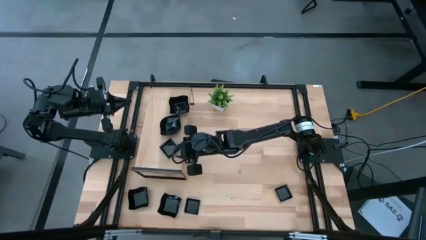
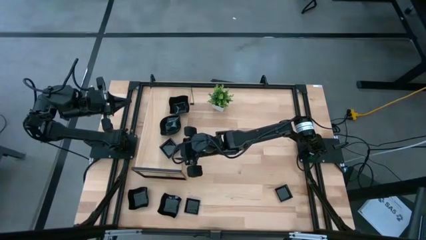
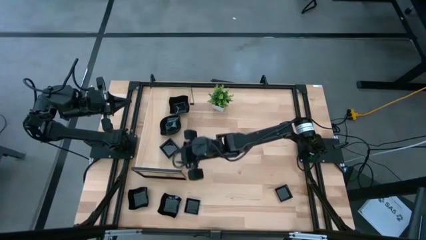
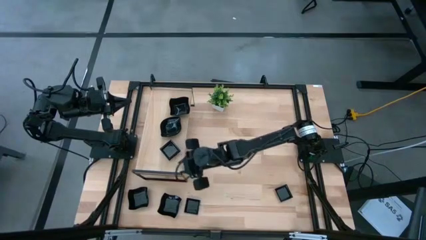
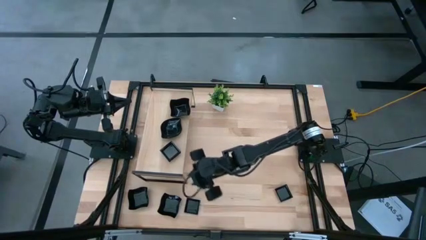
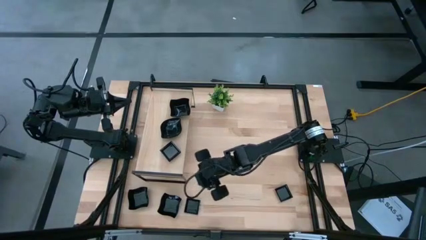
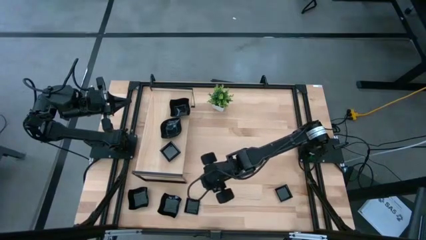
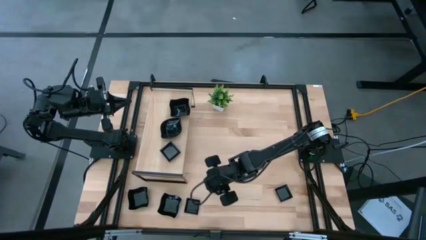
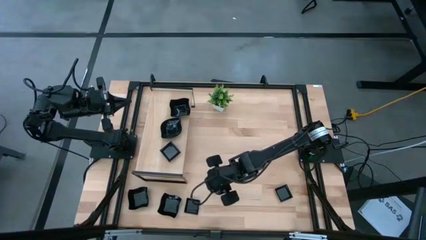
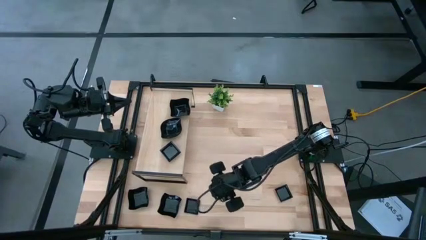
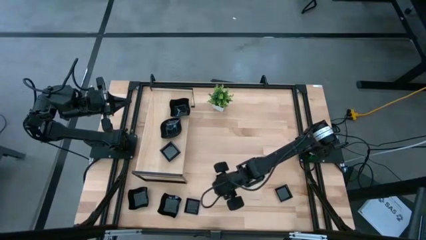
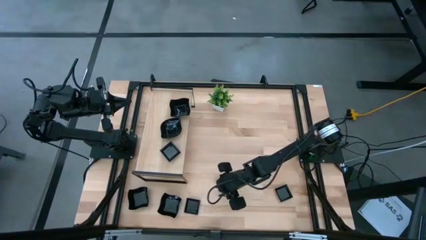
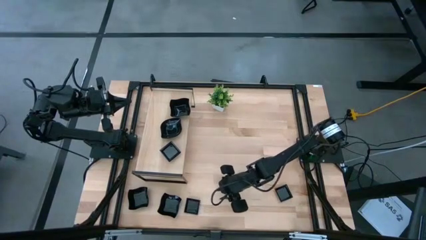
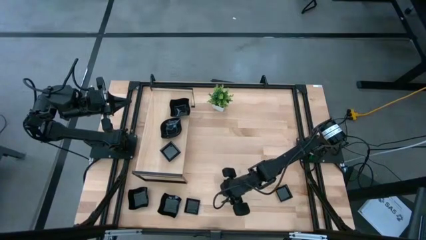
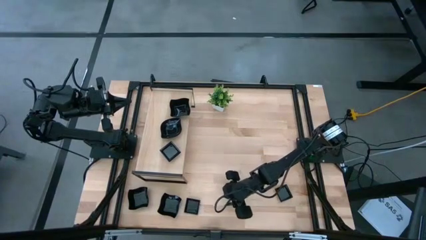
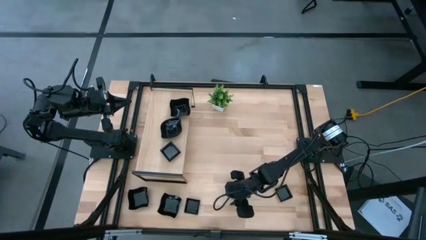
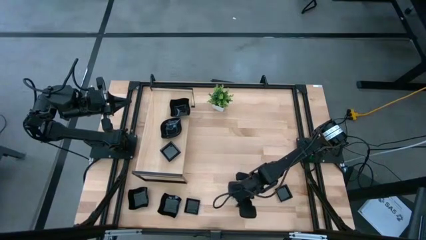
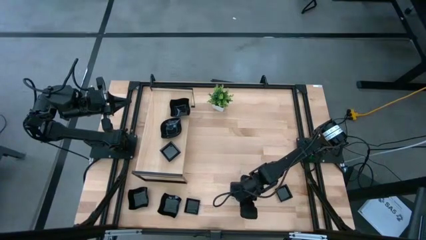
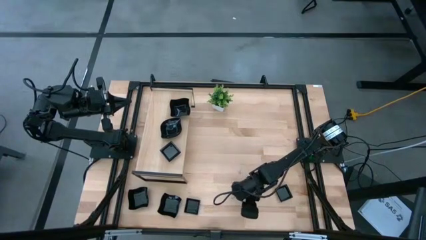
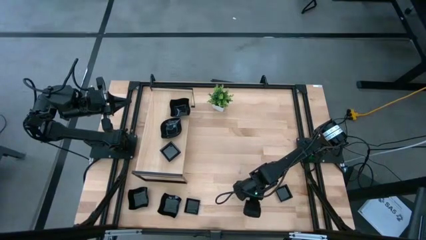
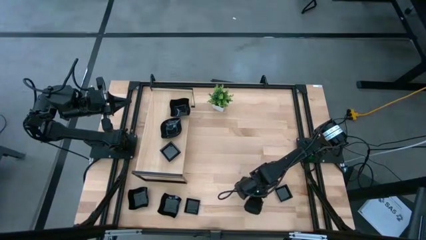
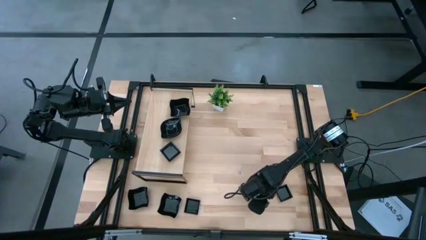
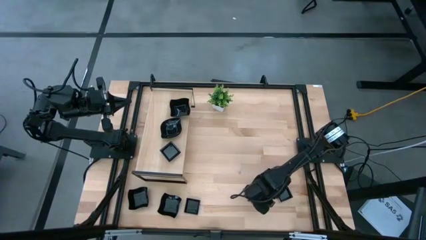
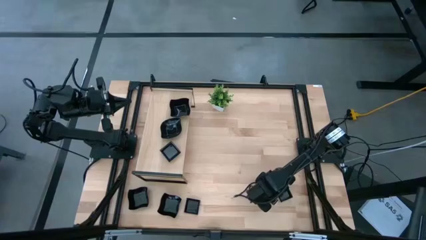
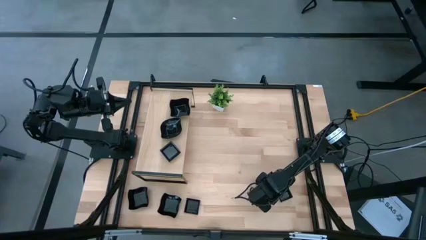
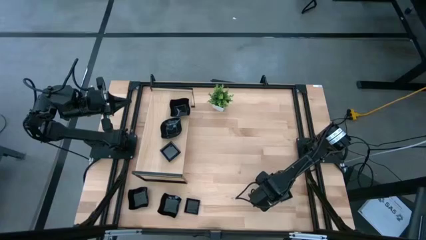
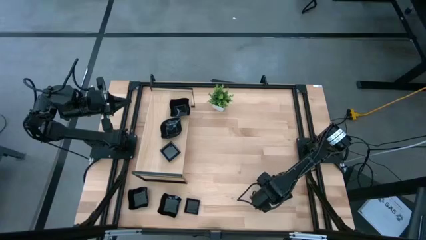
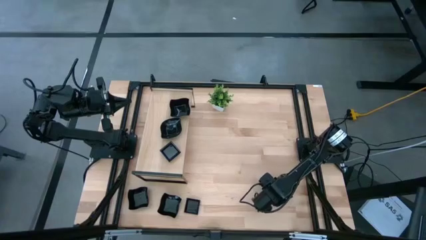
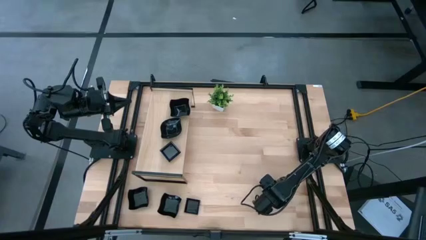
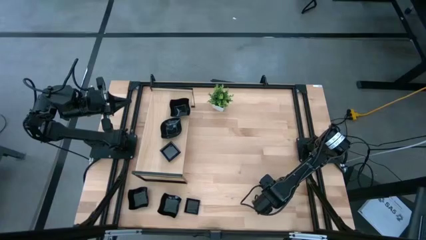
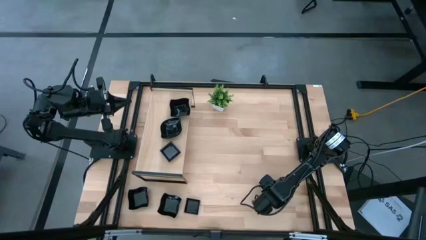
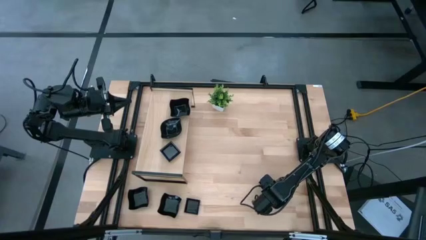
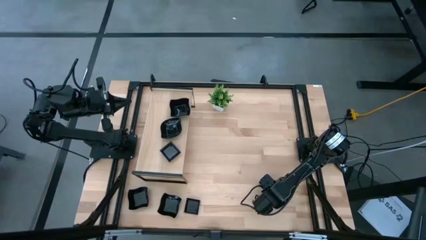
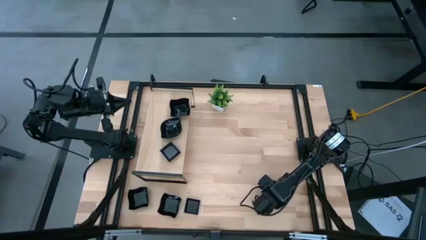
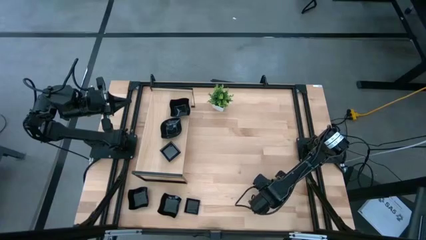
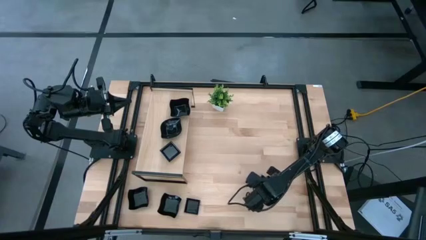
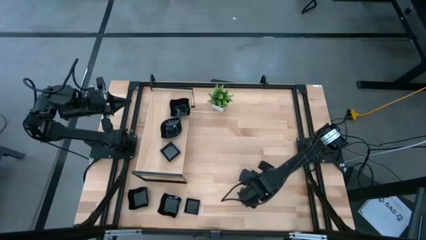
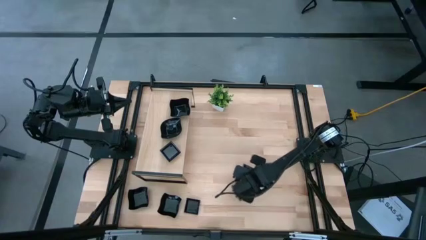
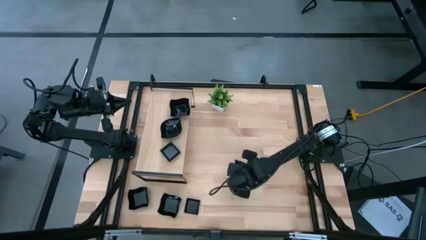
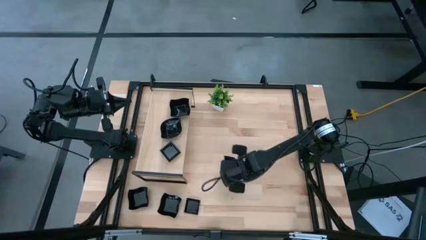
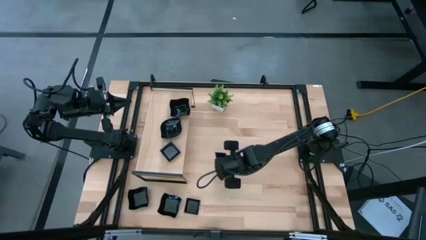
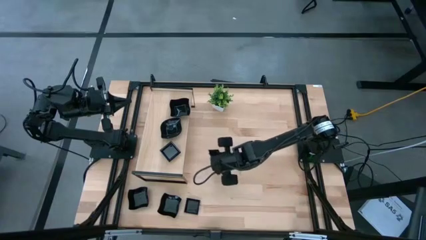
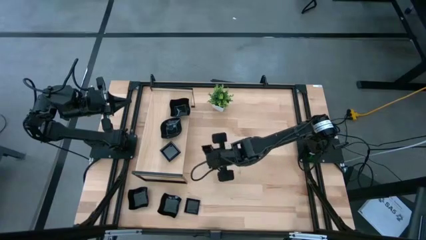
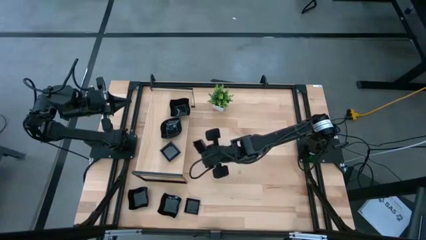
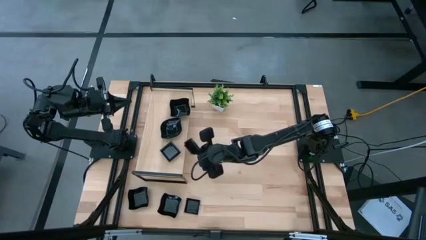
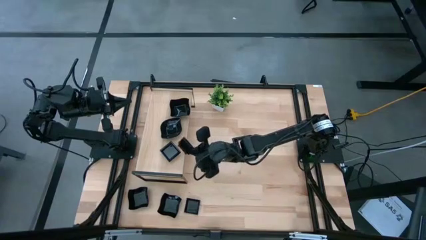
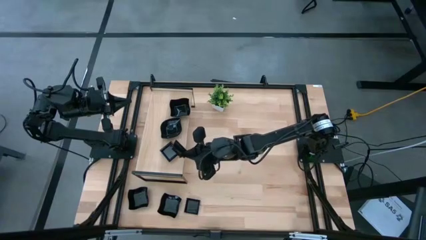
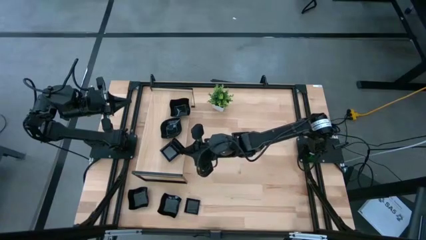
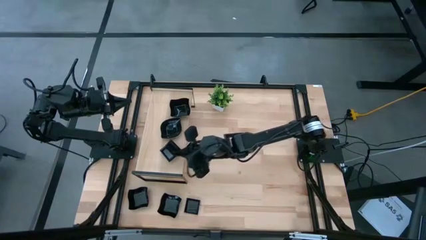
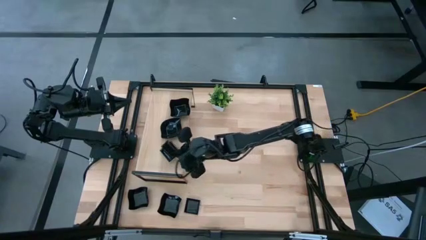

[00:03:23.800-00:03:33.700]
Task: Pick & Place Mini shaped plates
Stack the black square plate on top of the black square plate on the shelf

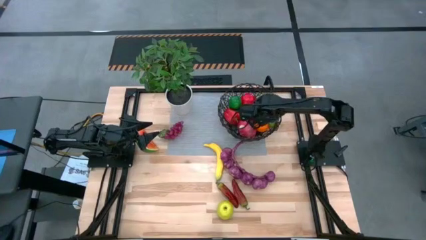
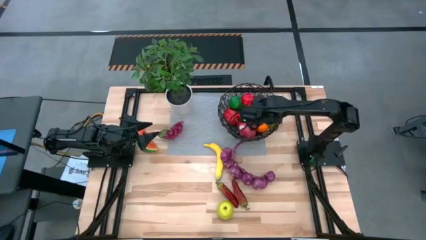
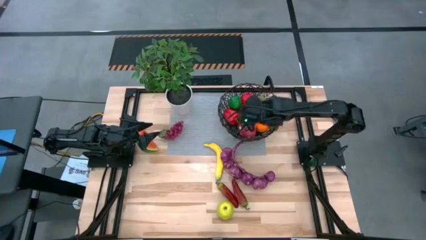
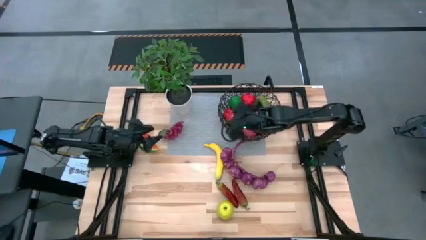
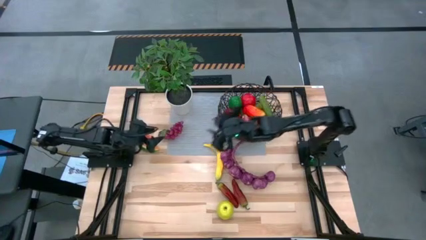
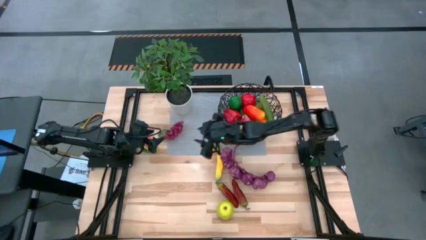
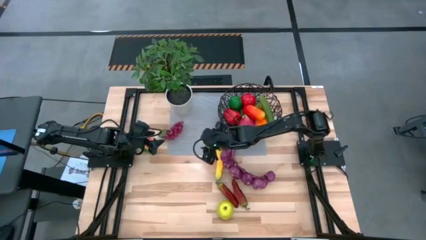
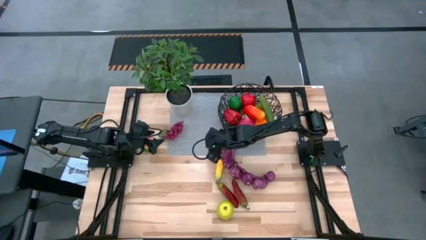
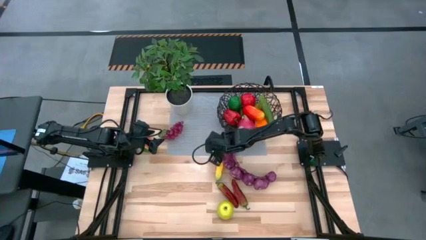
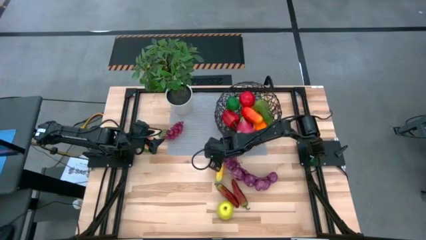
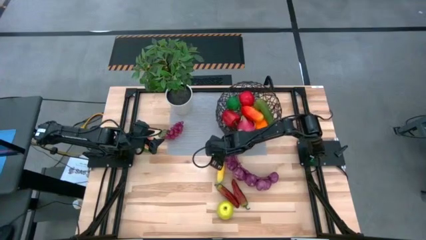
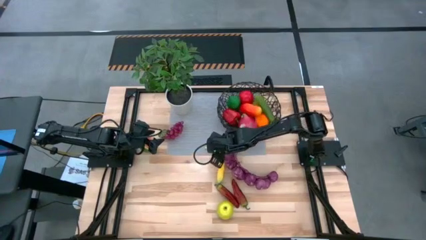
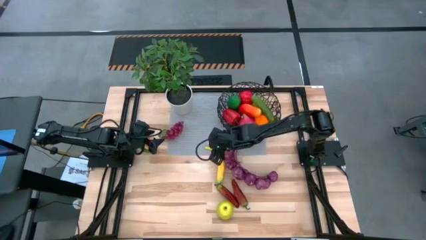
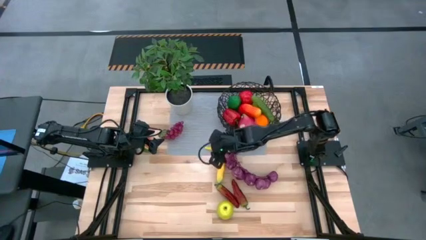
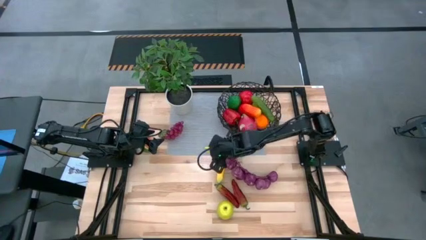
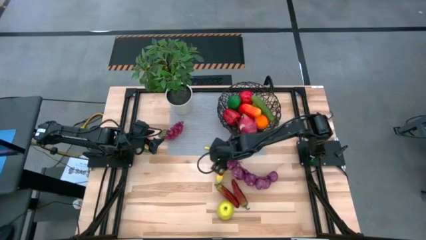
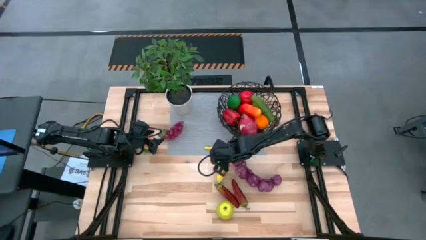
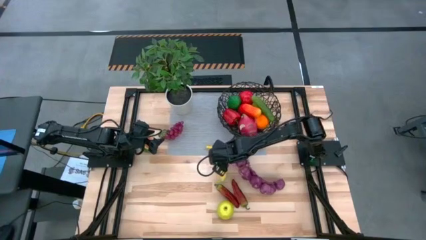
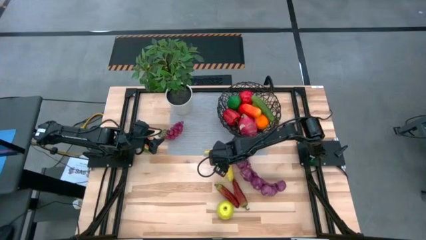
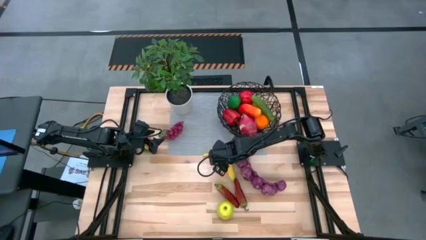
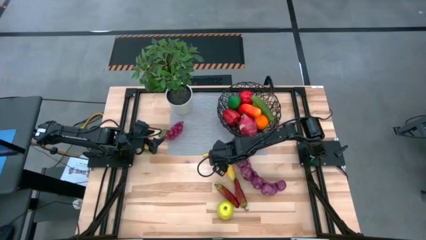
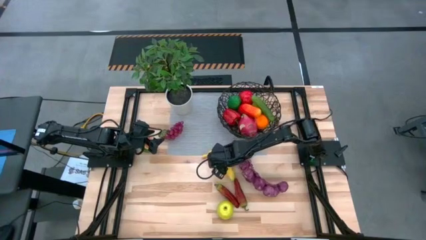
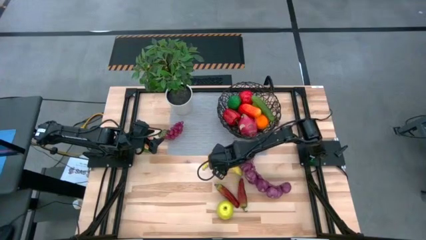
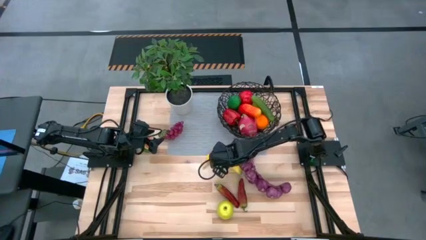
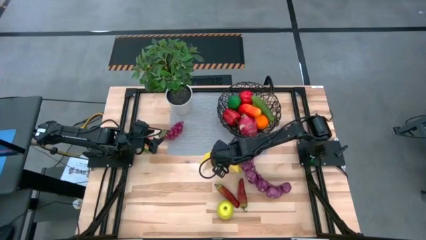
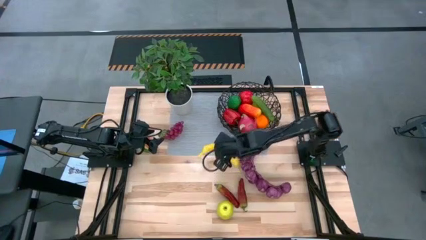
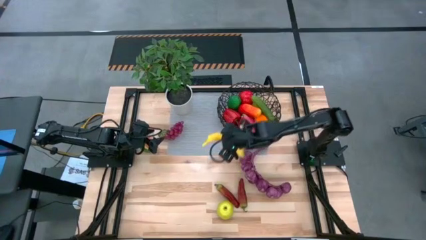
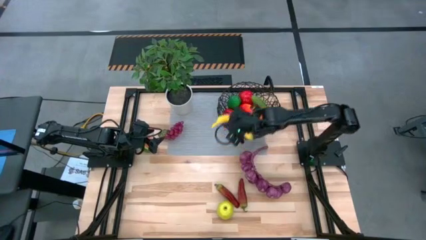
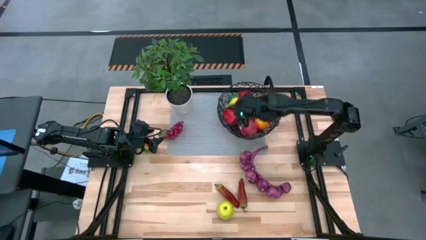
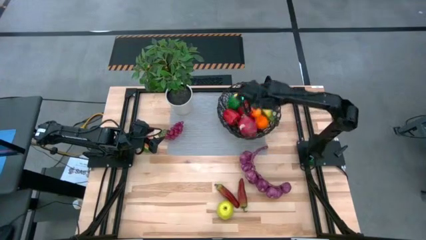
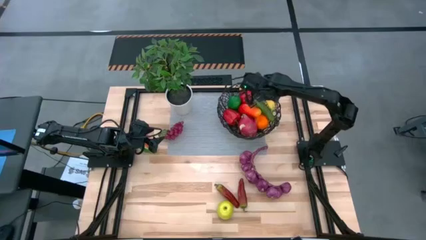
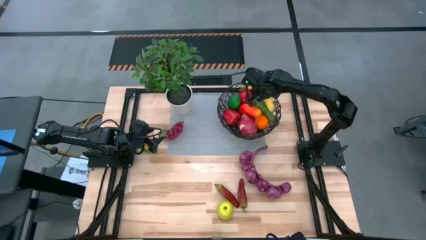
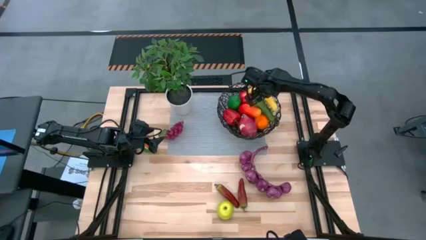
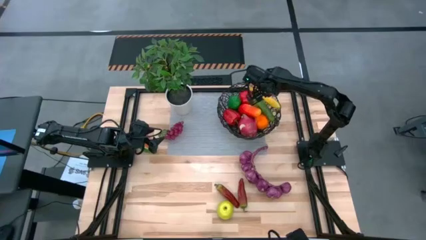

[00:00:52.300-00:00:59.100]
Task: Build produce basket
Put the banana into the wire basket
